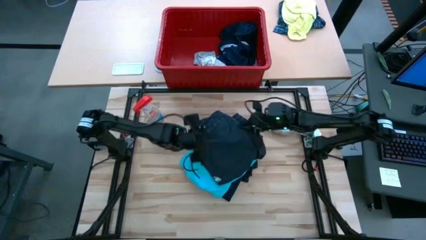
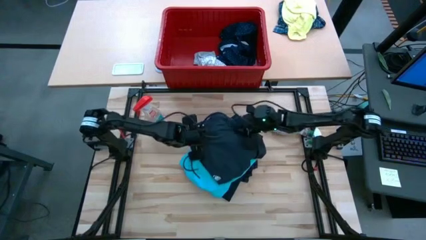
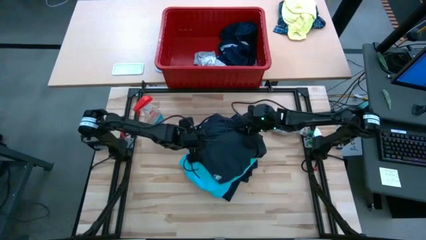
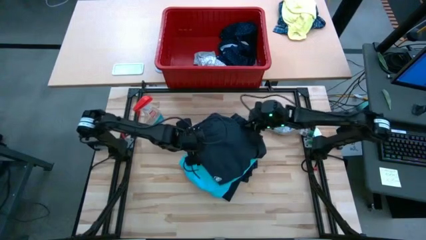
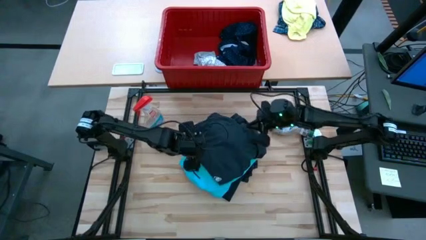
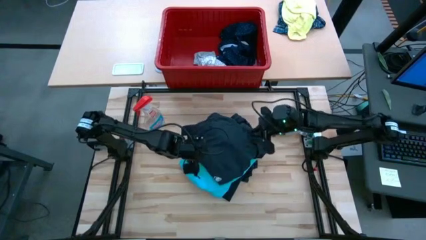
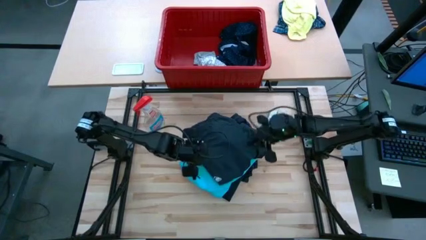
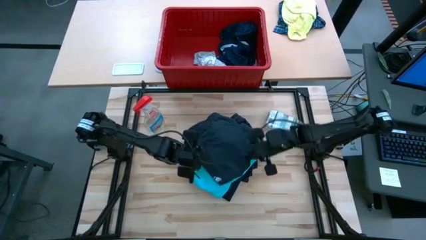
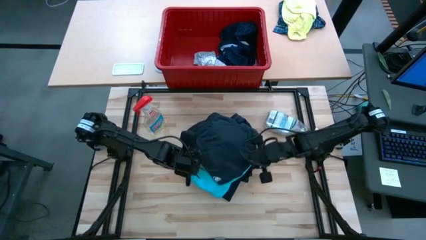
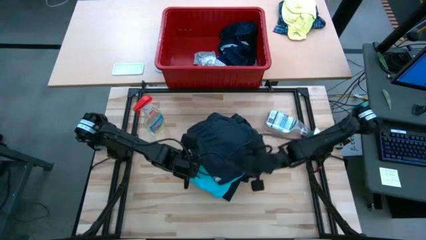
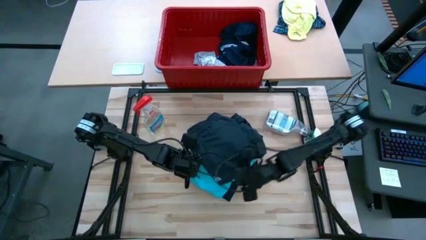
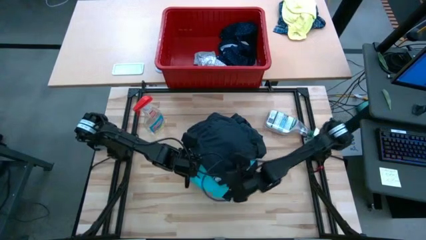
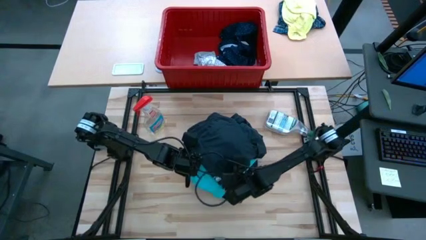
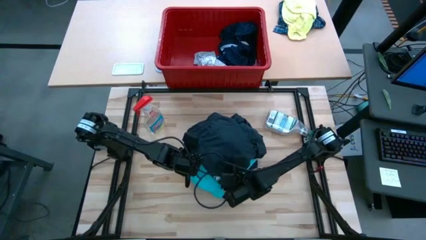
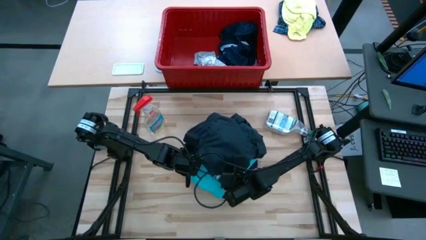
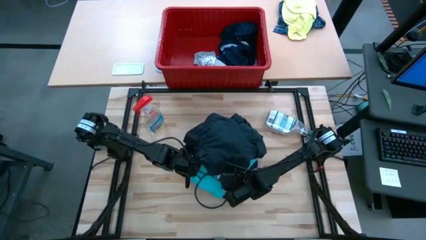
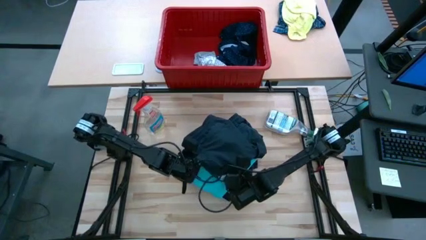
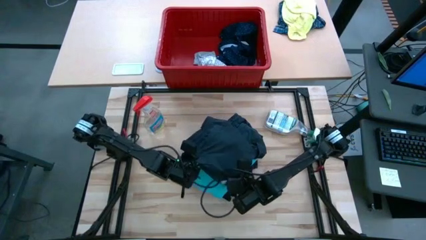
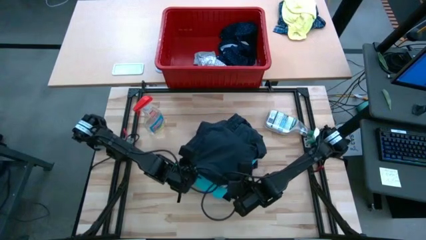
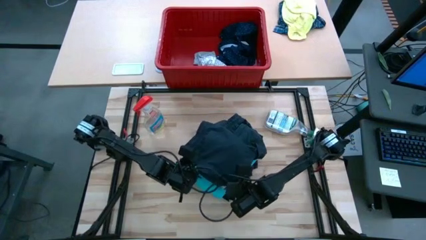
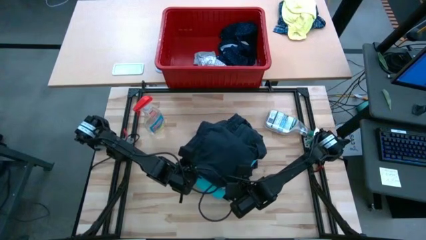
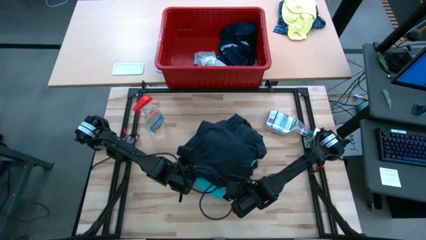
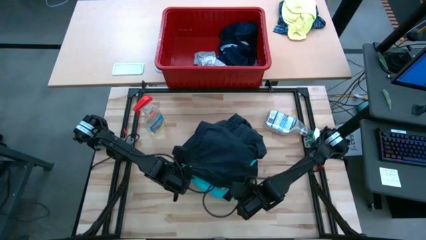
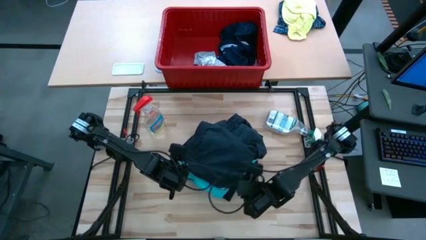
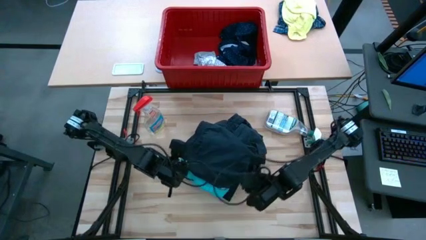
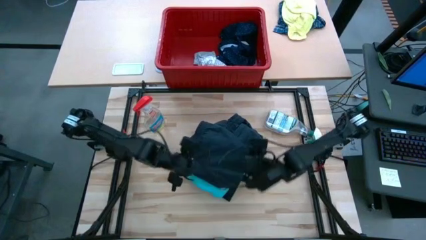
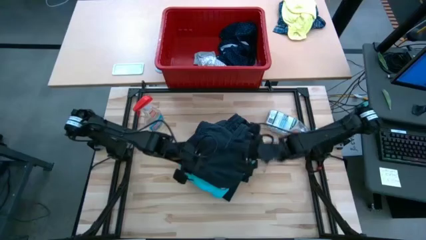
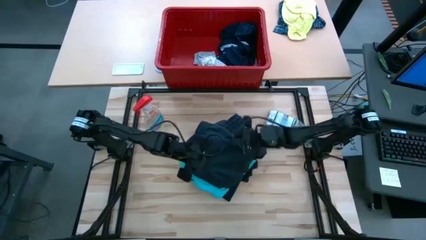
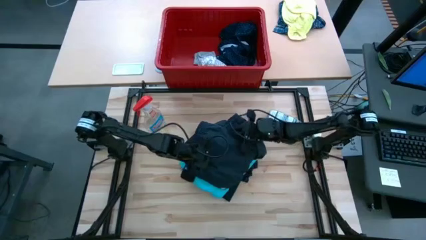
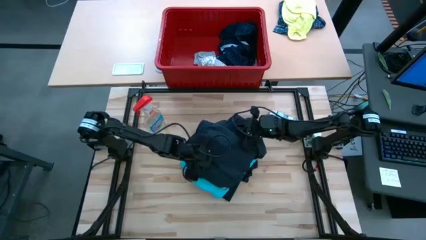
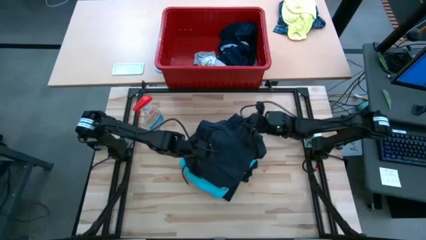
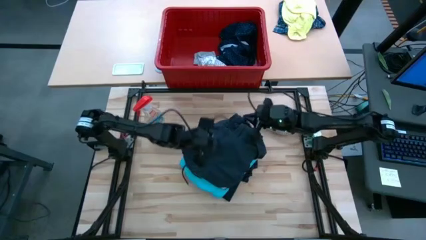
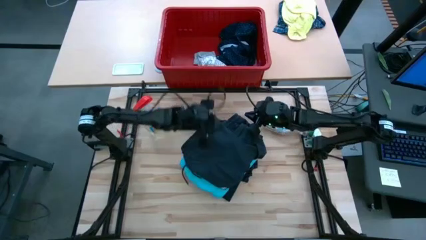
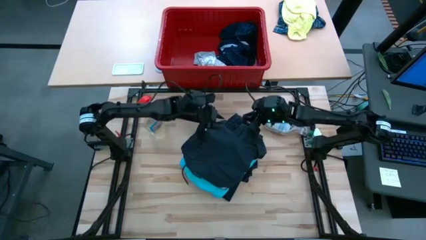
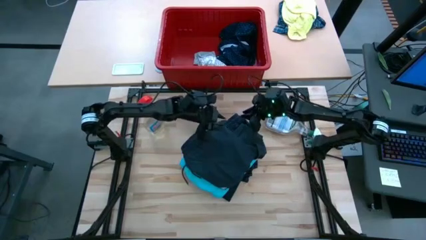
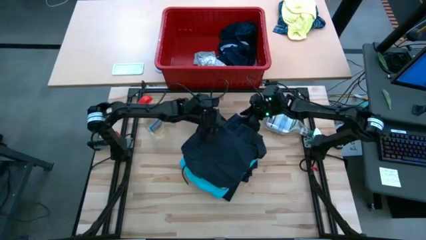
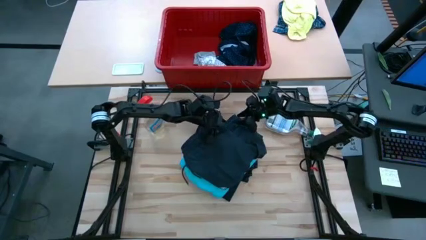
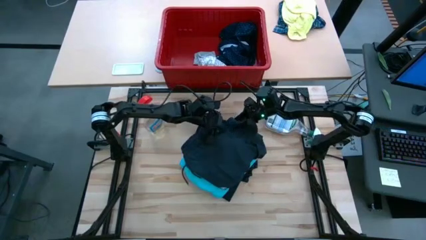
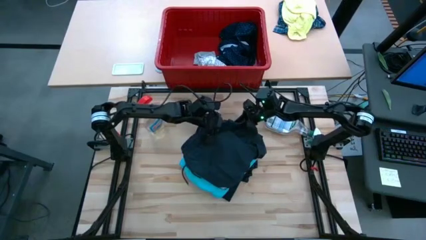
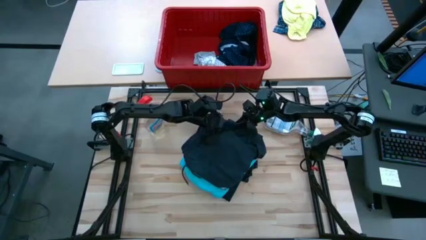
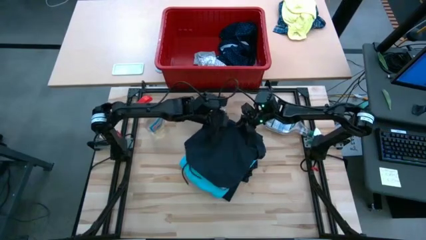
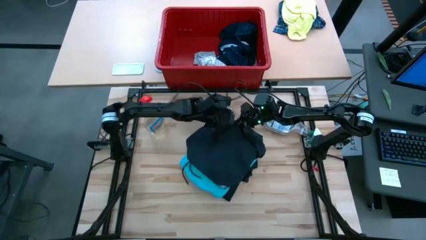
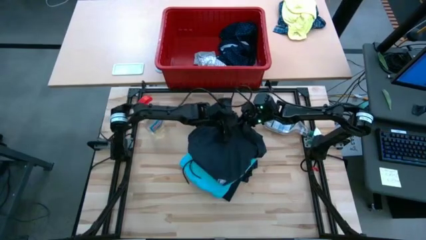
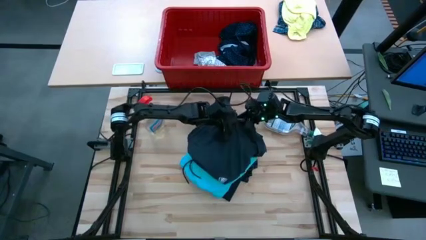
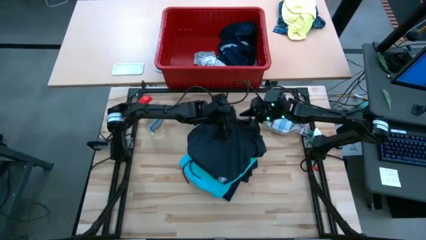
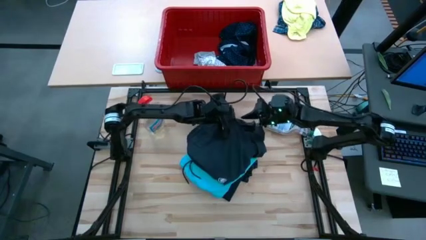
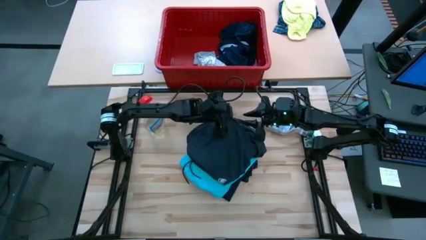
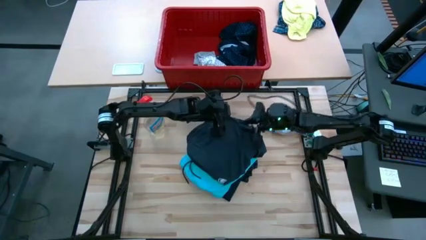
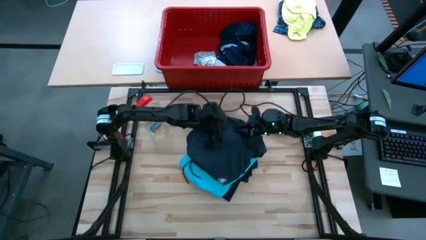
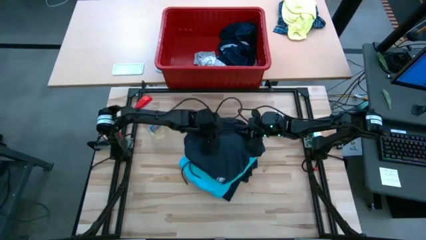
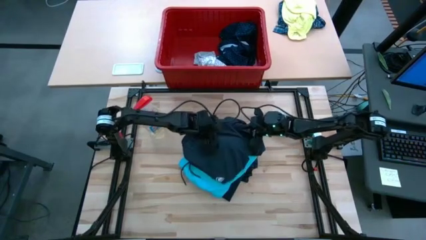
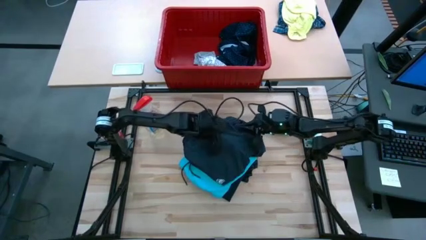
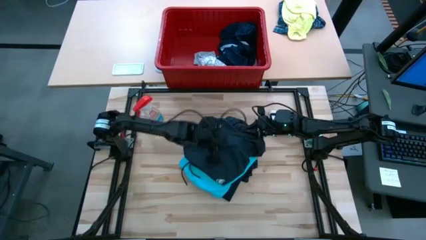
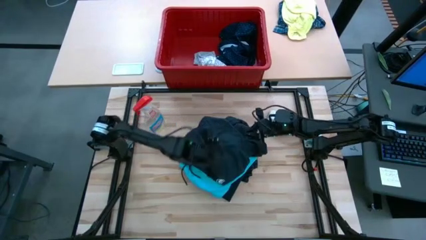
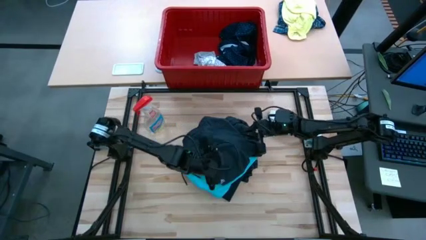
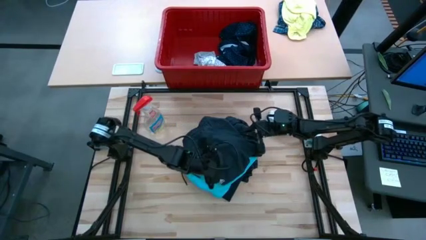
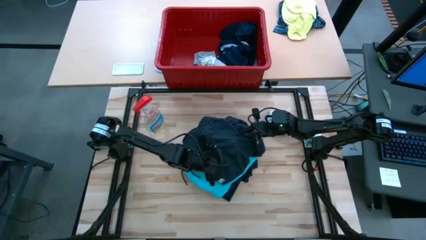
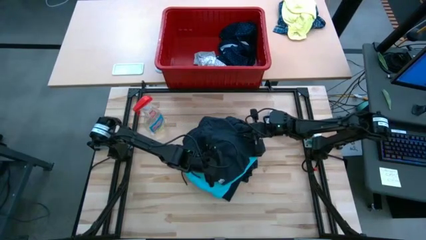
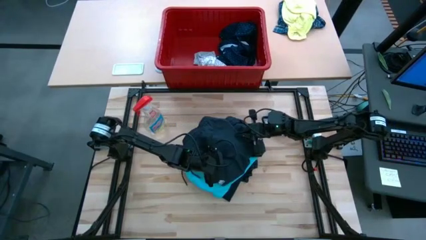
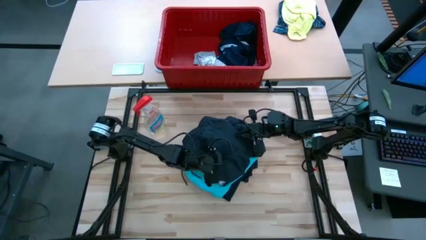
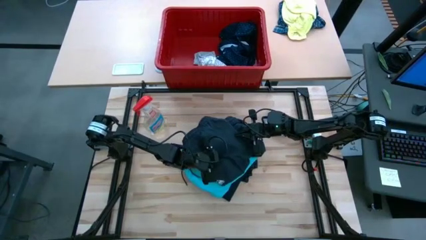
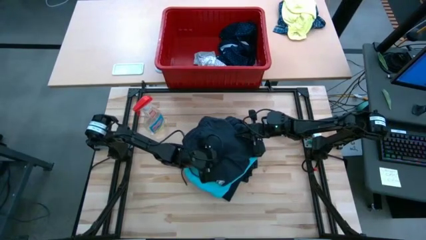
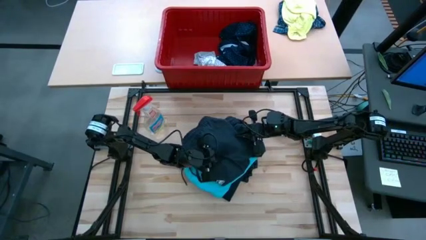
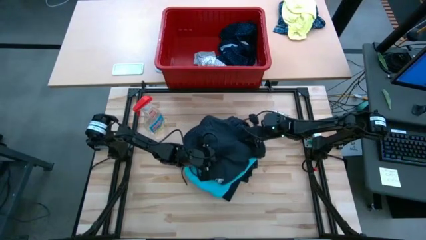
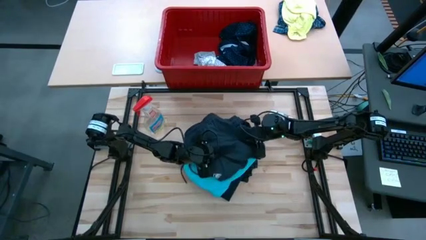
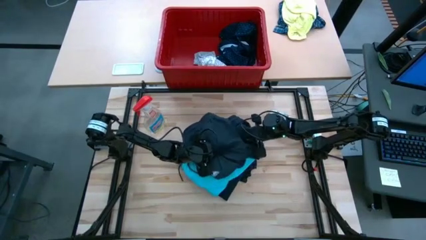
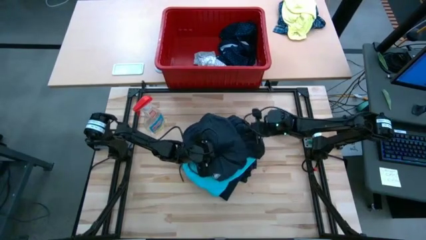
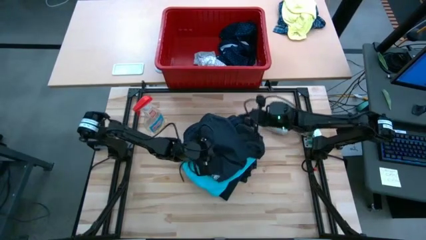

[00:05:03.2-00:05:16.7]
Task: Fold Laundry from Bin
Fold the black shorts
